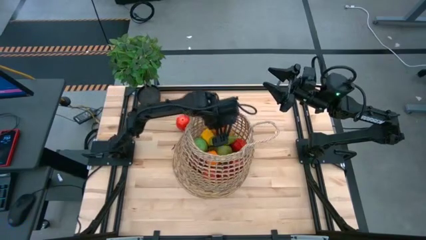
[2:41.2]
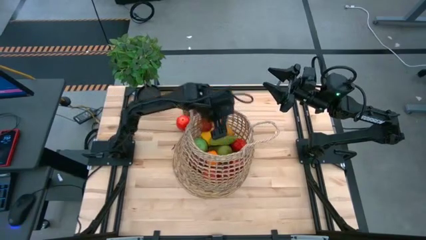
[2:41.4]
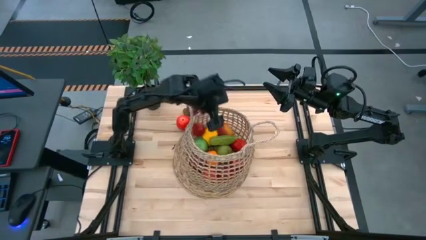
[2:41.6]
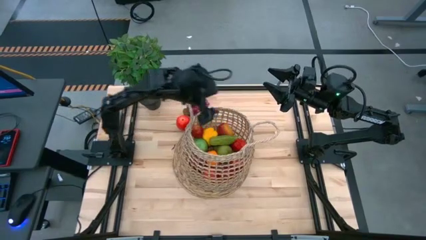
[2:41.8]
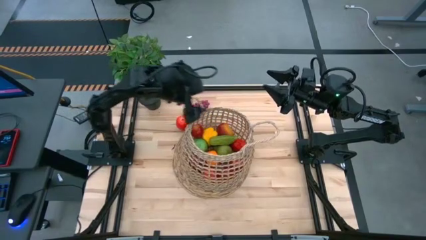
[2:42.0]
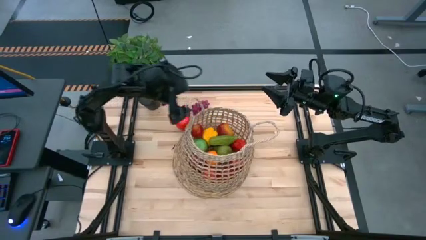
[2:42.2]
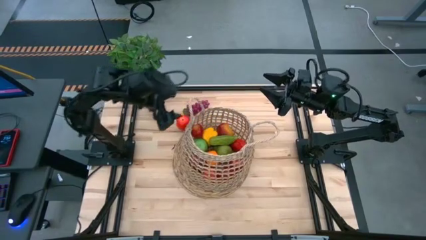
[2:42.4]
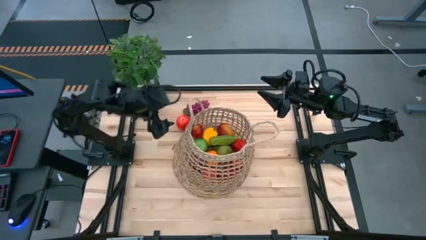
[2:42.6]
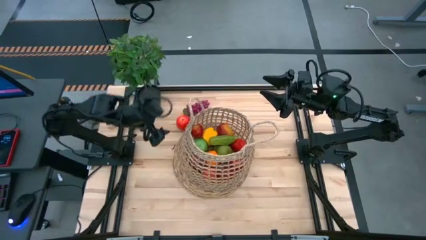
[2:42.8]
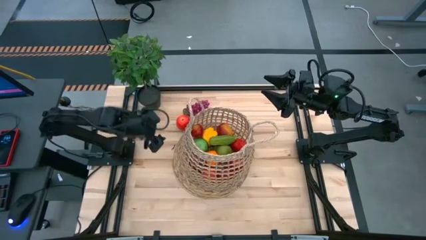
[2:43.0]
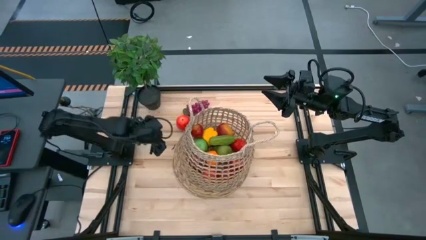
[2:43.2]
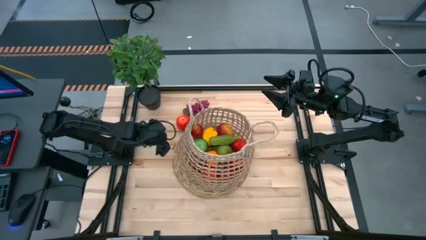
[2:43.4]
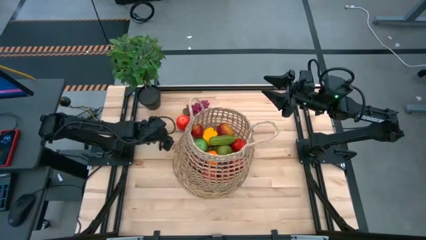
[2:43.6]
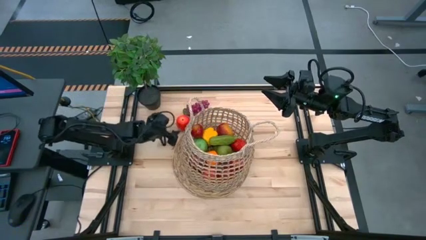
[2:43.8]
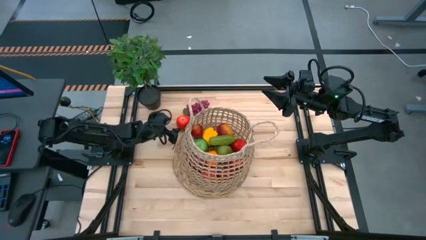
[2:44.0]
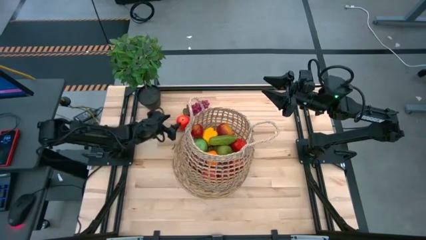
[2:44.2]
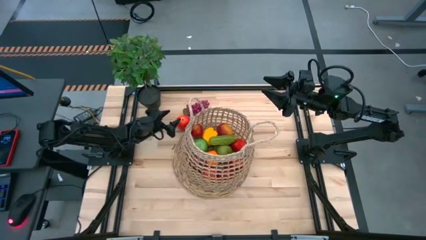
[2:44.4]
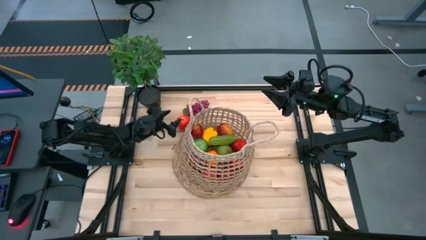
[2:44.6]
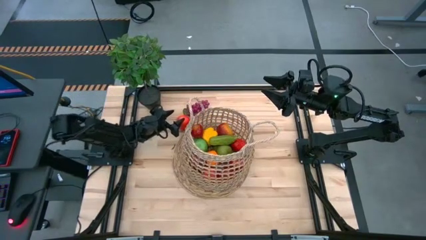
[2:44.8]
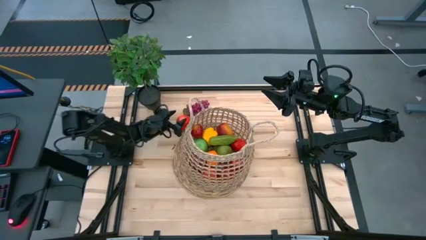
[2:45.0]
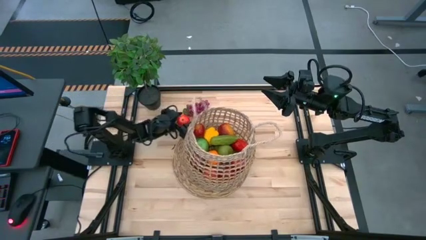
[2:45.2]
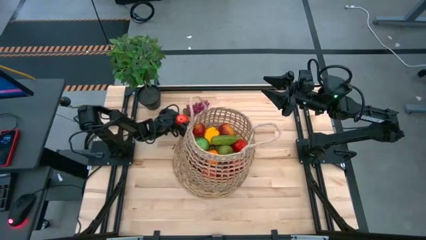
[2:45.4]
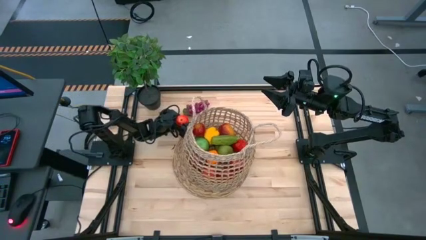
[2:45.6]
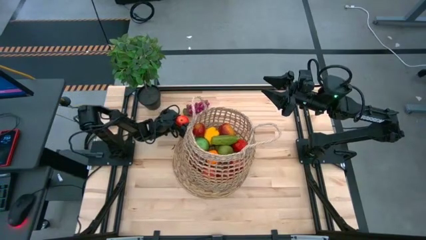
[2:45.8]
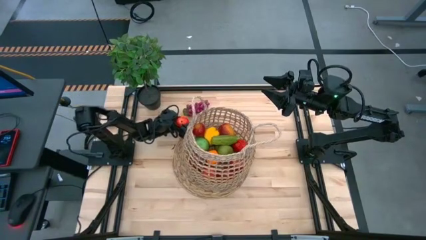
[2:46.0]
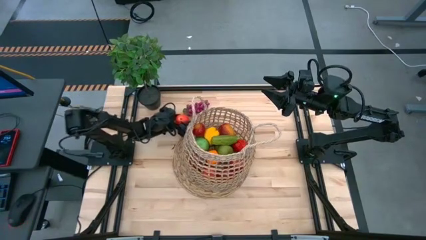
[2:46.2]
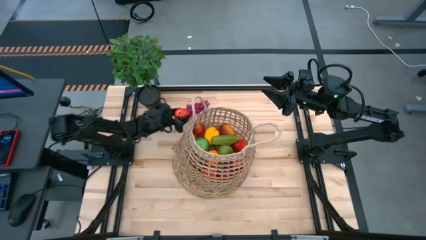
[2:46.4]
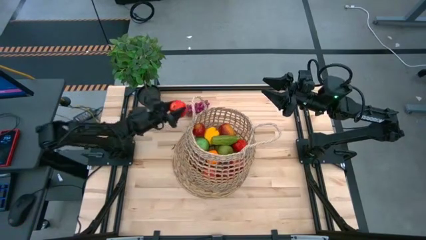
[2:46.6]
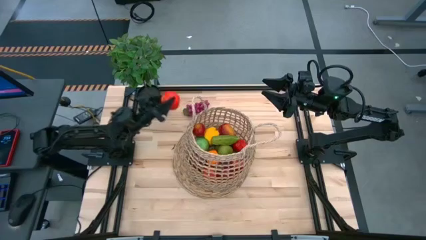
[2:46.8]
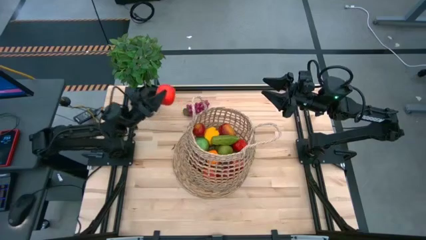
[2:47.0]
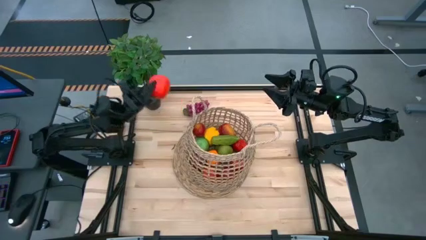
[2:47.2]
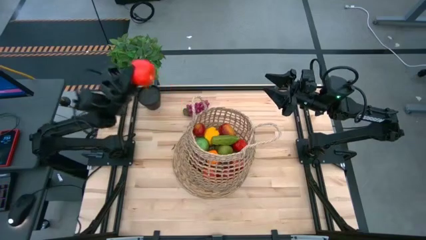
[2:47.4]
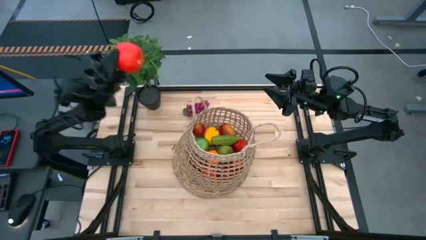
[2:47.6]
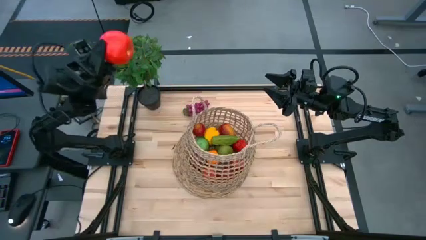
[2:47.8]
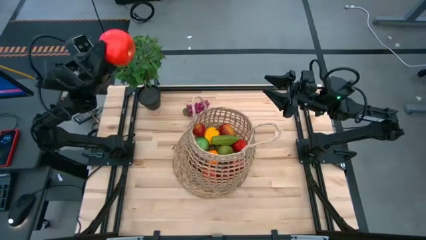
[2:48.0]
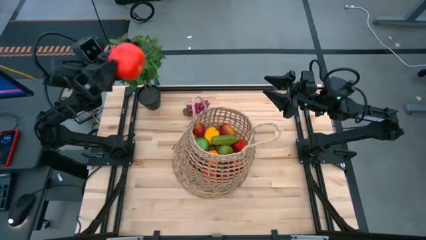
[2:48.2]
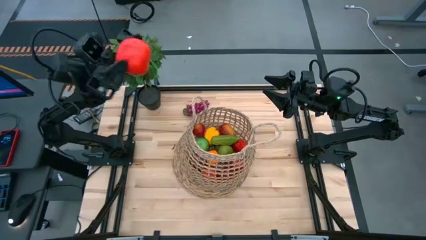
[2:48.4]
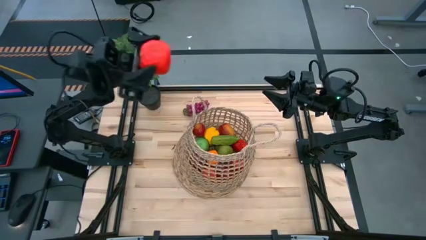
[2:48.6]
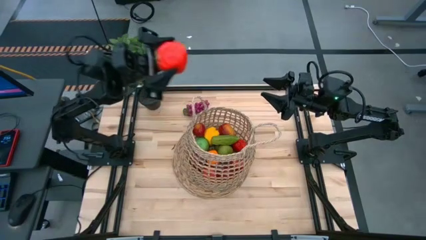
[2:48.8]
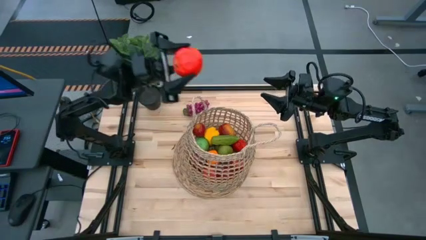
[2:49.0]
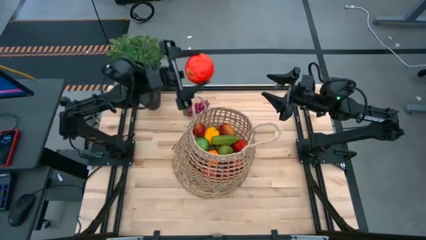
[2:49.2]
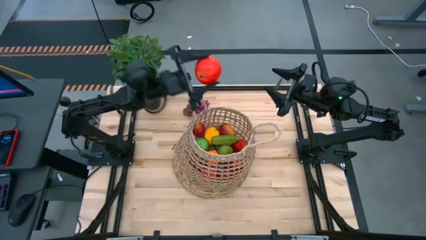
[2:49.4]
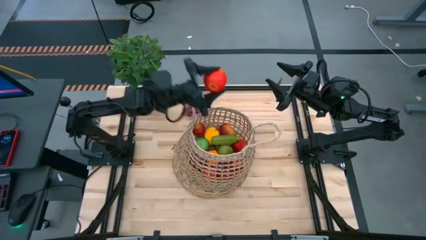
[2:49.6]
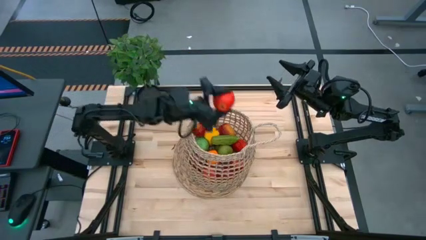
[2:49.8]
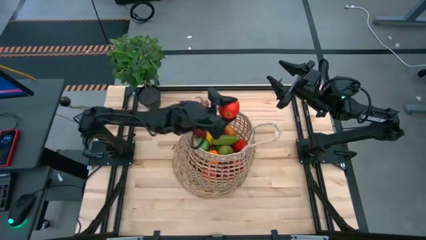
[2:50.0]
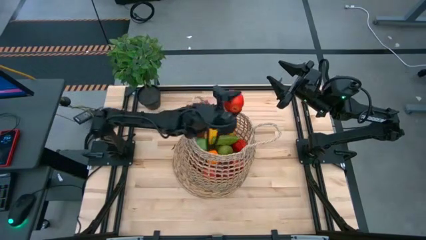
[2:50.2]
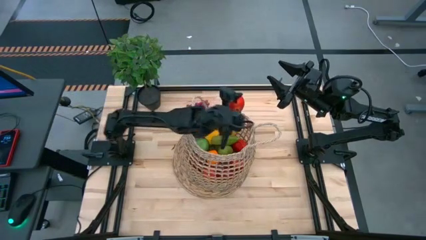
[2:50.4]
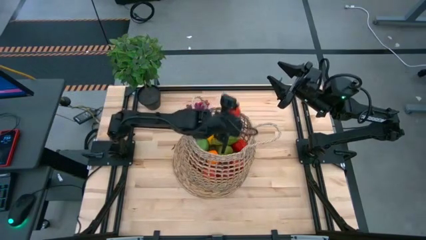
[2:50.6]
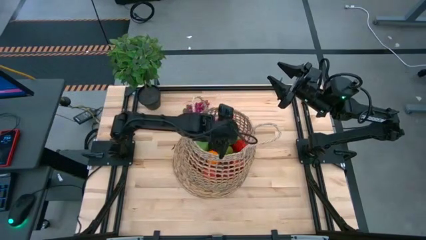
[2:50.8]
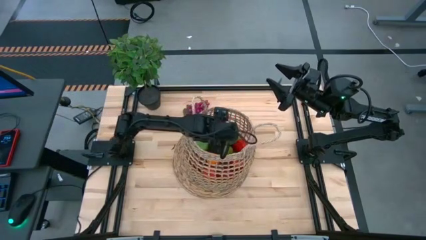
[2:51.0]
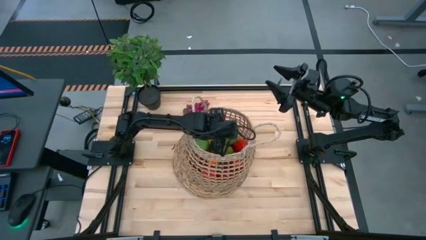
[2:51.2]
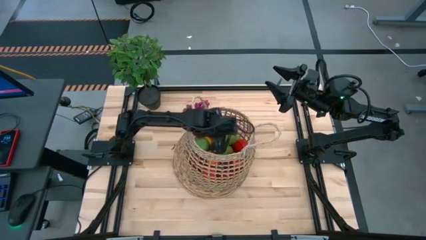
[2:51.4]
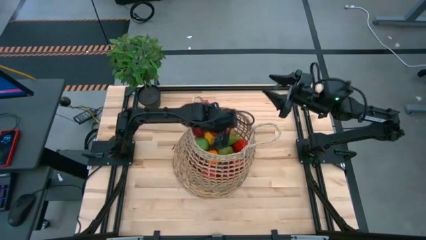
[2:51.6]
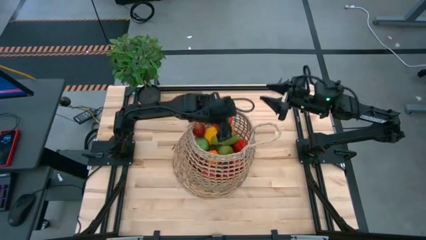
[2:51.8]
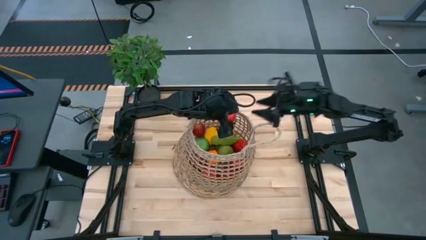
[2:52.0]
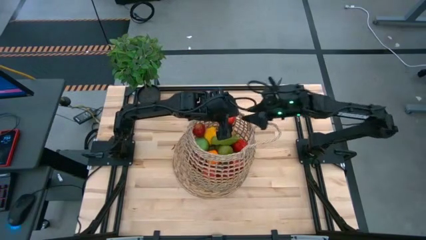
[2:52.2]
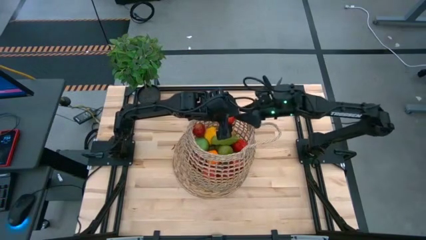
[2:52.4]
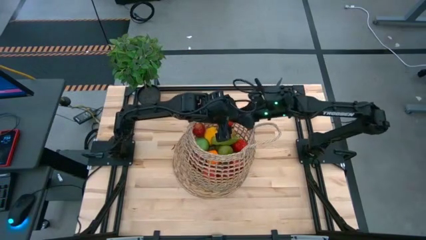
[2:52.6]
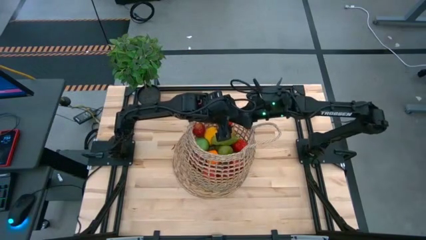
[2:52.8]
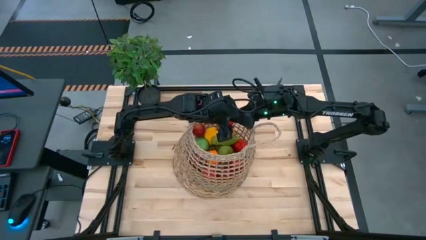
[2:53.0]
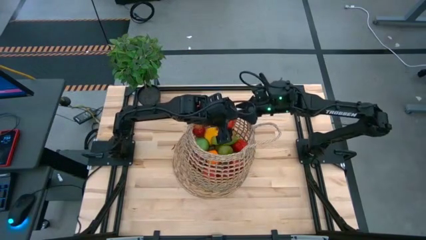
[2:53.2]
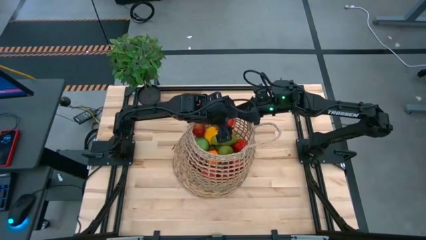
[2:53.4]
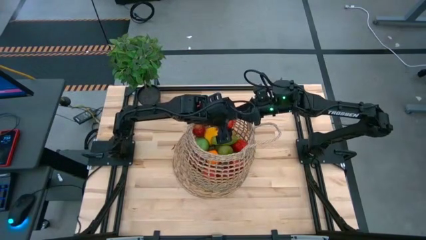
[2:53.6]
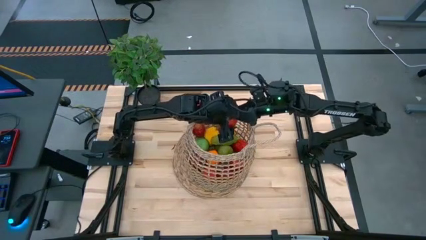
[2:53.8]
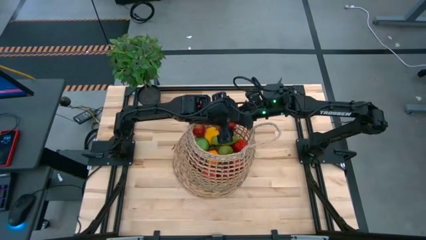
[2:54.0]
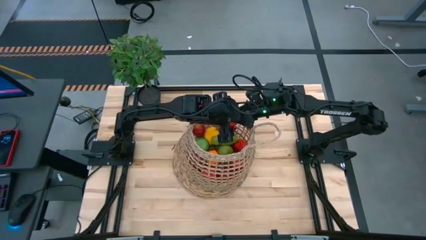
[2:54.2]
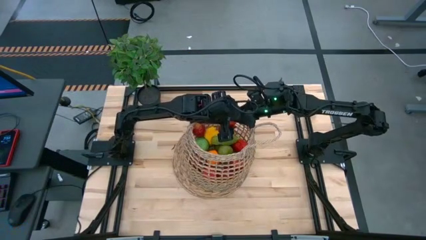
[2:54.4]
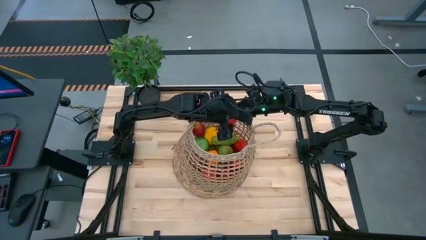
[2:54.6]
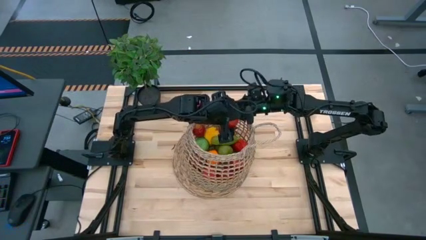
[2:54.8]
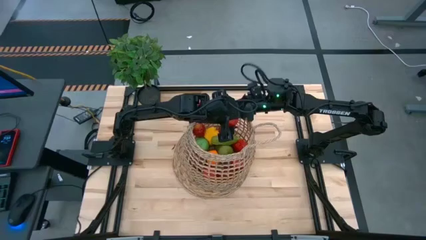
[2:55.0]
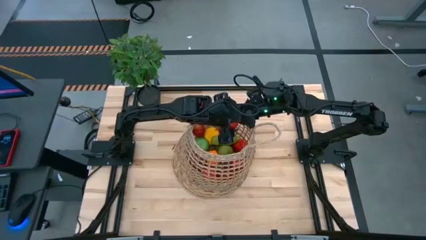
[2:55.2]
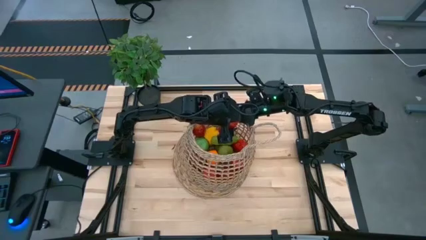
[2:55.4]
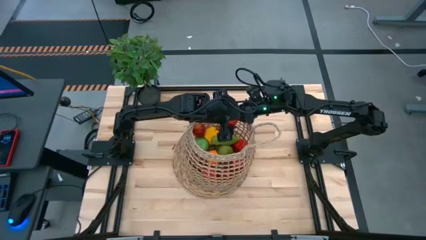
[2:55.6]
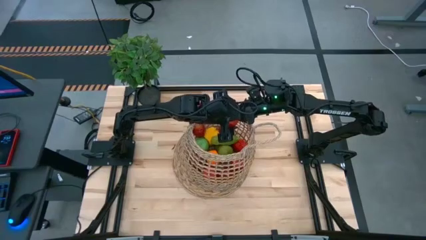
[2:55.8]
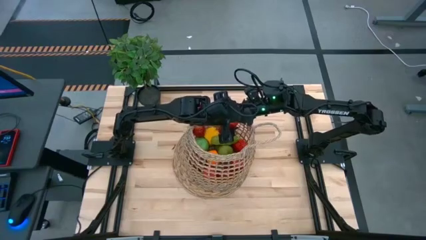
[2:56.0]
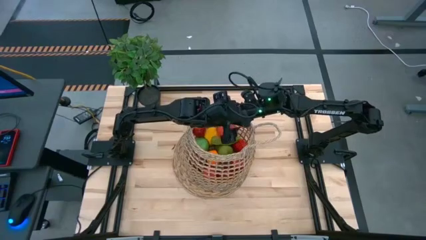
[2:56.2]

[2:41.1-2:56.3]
Task: Build produce basket
Put the red apple into the brown basket

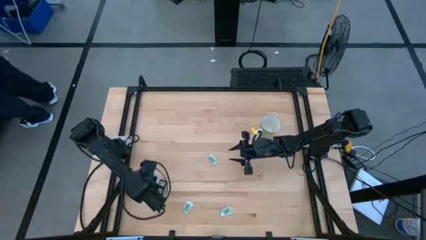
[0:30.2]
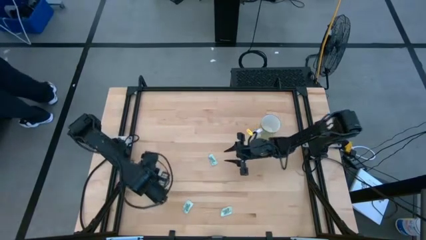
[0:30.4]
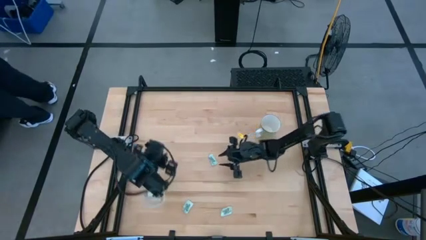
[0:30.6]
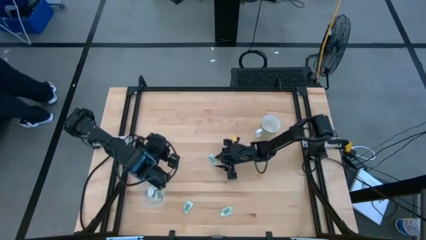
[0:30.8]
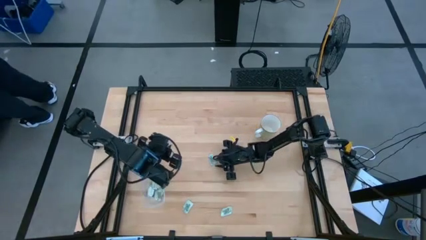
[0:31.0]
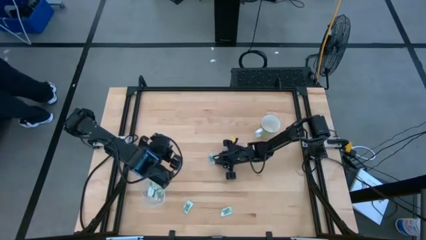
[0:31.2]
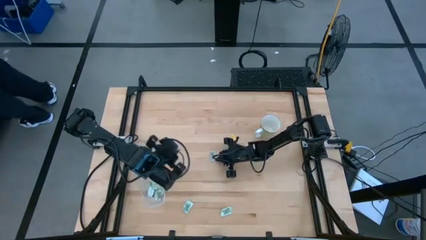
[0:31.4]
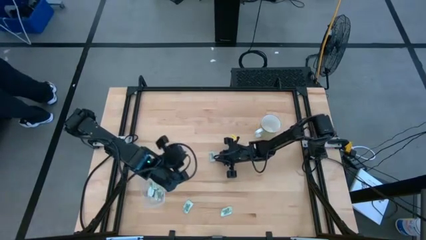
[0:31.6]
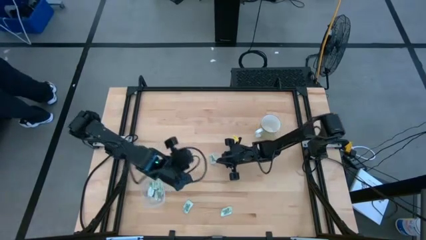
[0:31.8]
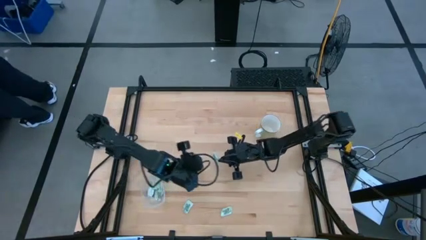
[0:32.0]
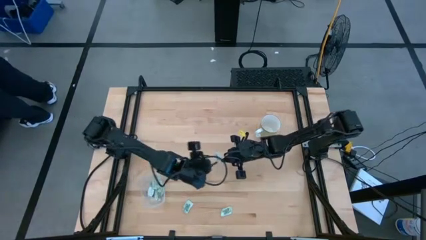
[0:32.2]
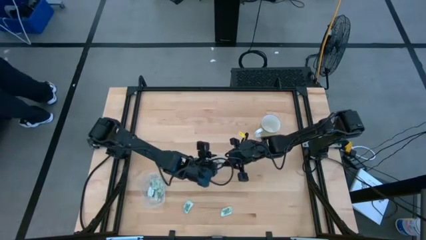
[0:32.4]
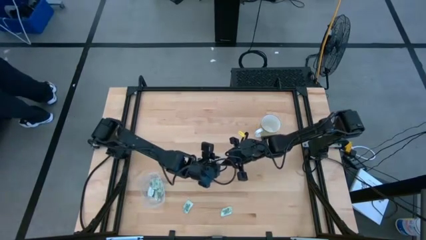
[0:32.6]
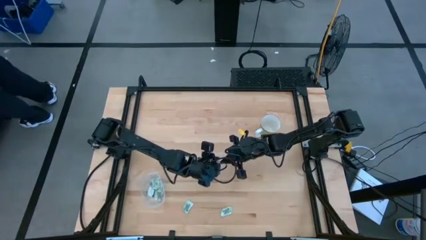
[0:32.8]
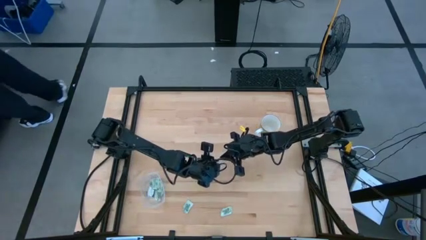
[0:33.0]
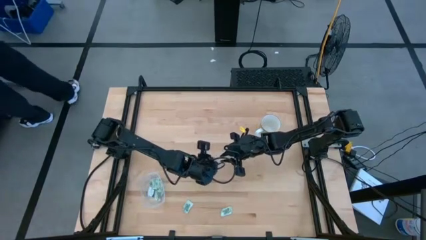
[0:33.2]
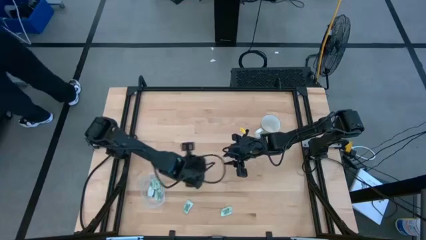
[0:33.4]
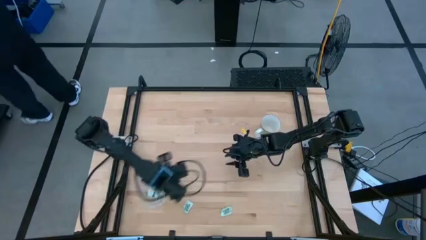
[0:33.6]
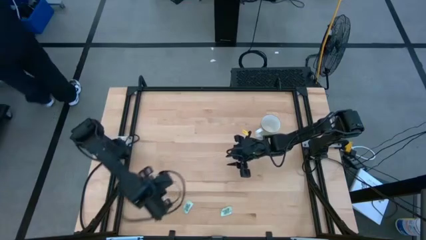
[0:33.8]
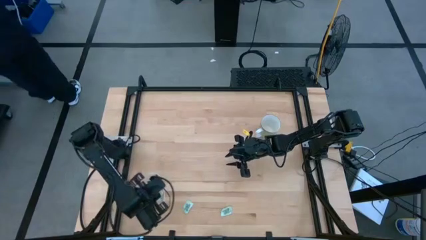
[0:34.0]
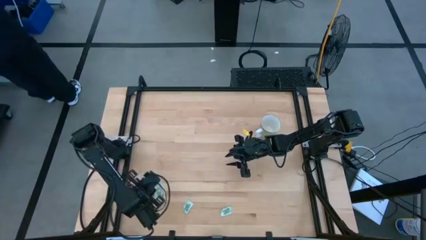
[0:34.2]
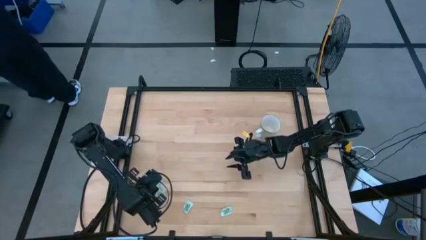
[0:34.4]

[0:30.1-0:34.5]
Task: Pick and place Stevia / Truvia into bins
Put the stevia packet into the transparent bin
